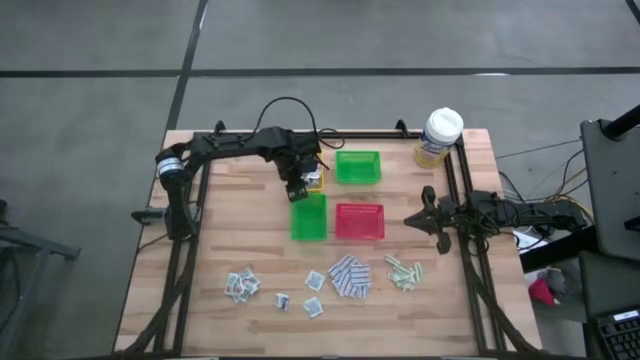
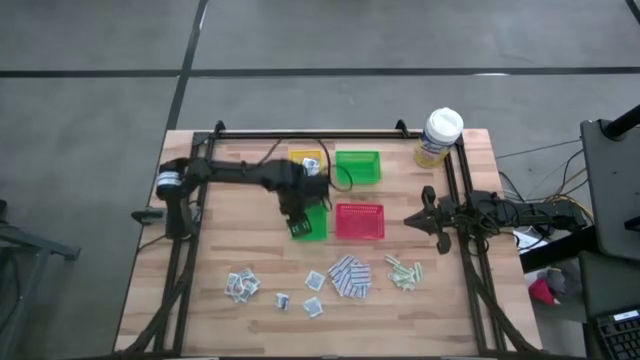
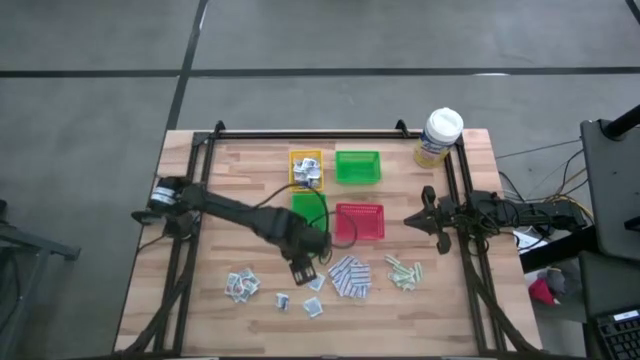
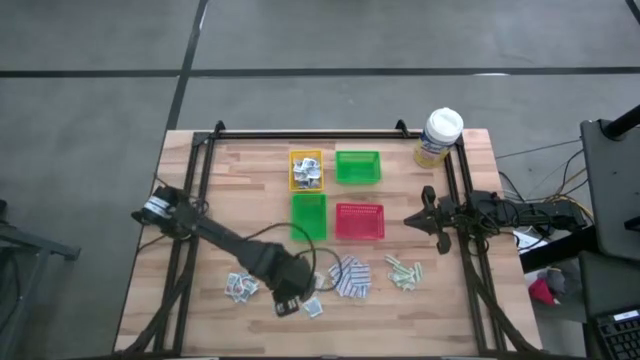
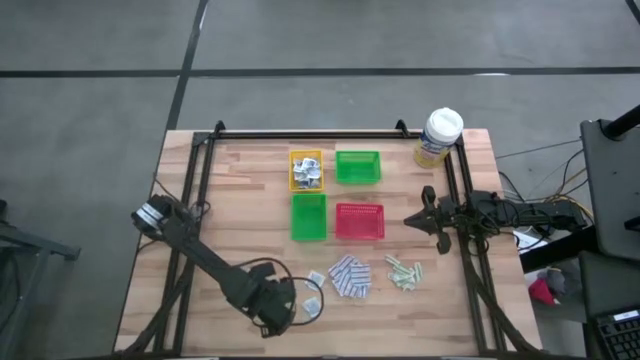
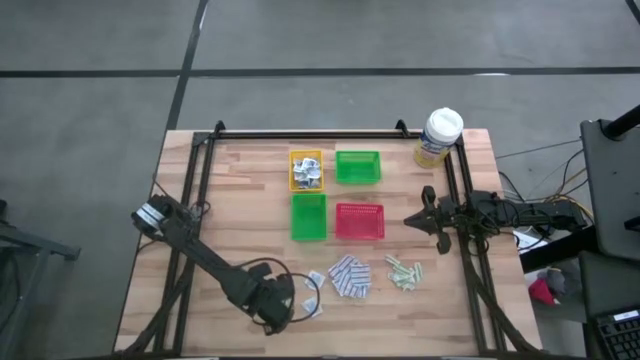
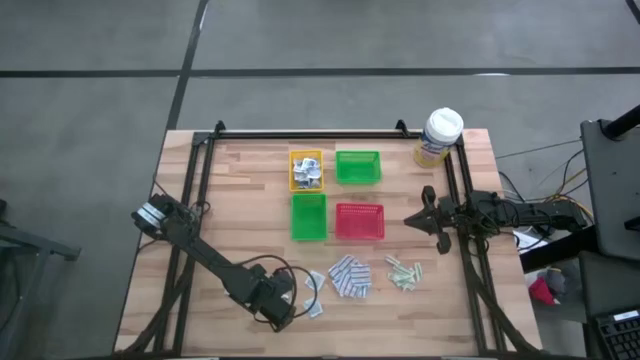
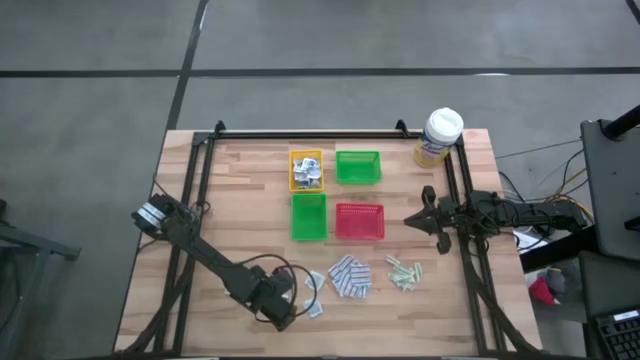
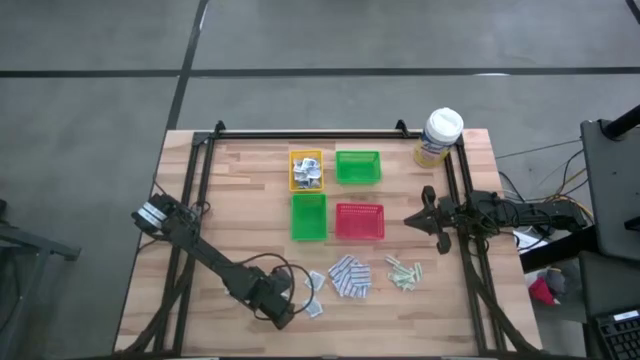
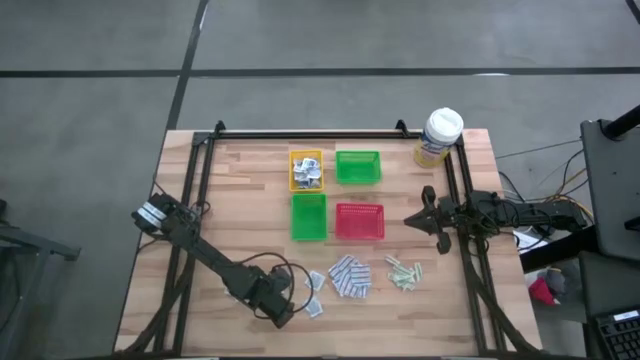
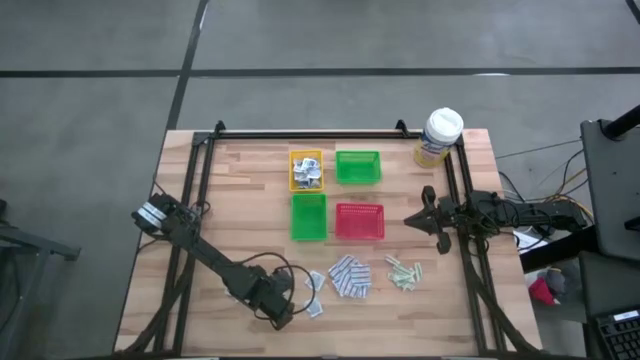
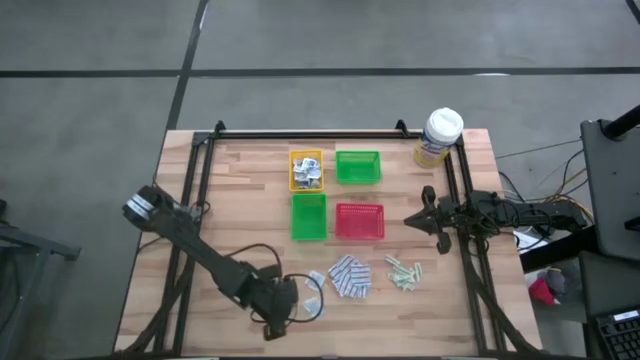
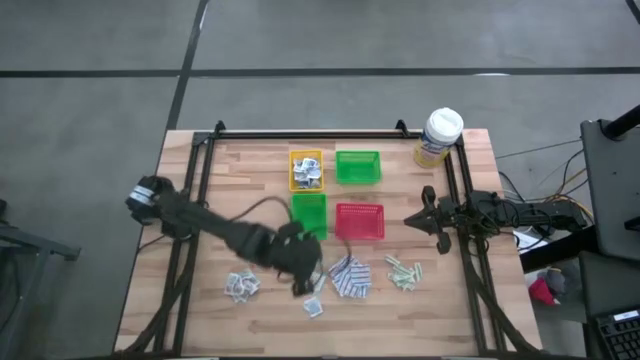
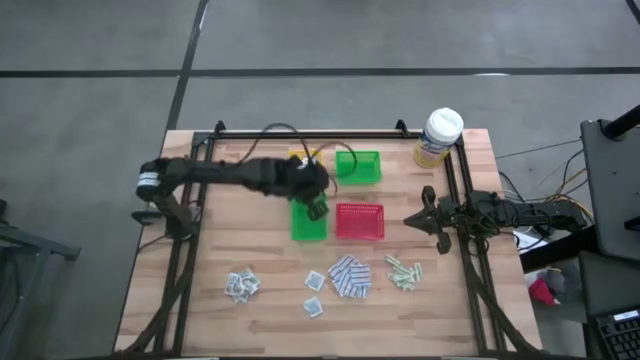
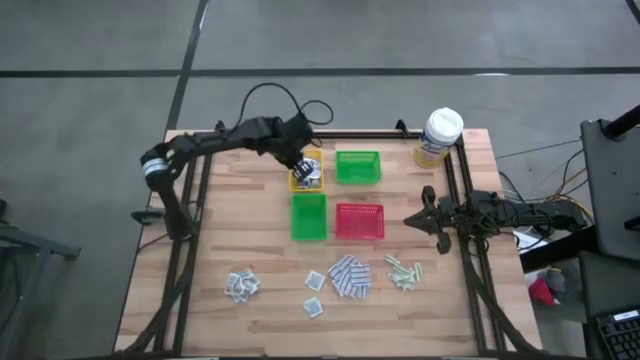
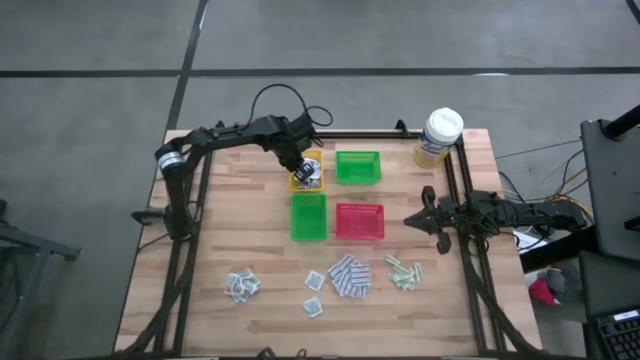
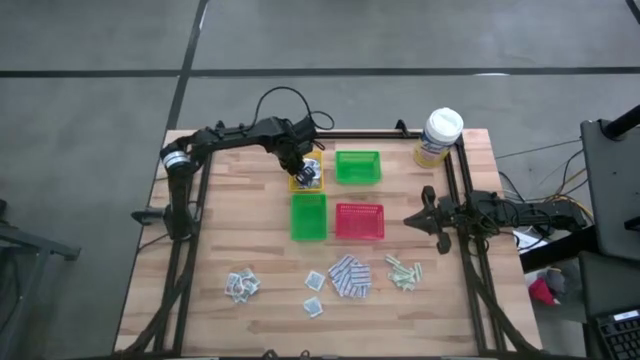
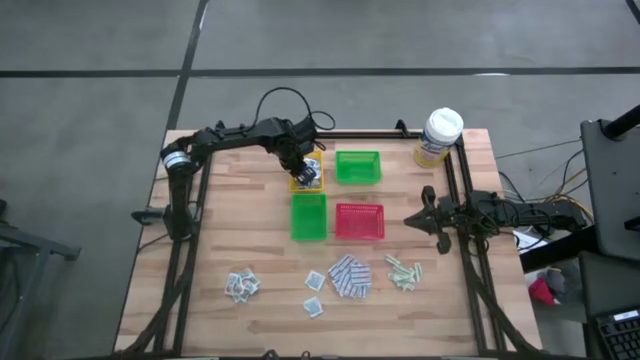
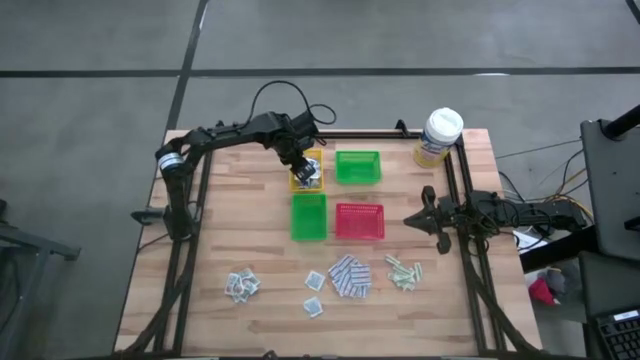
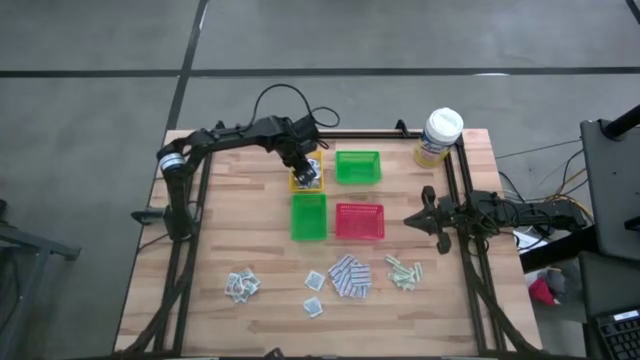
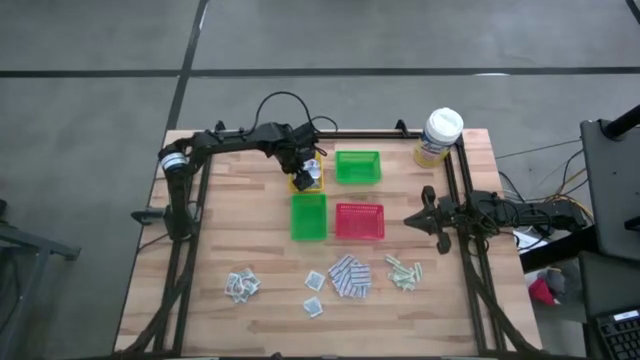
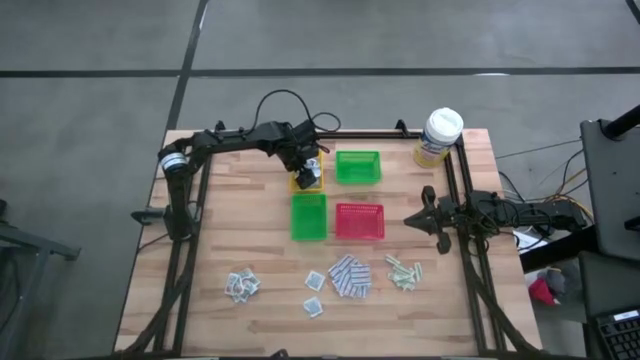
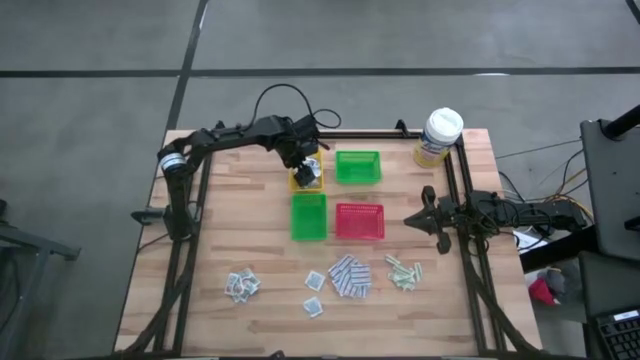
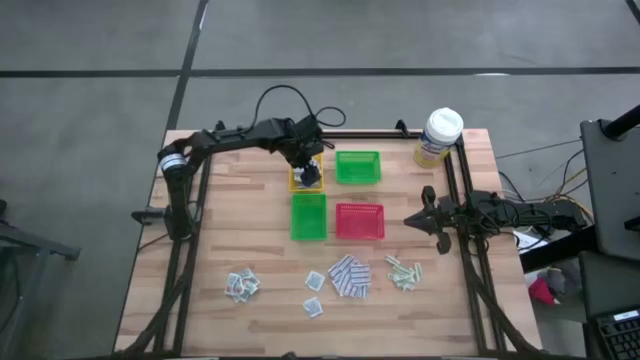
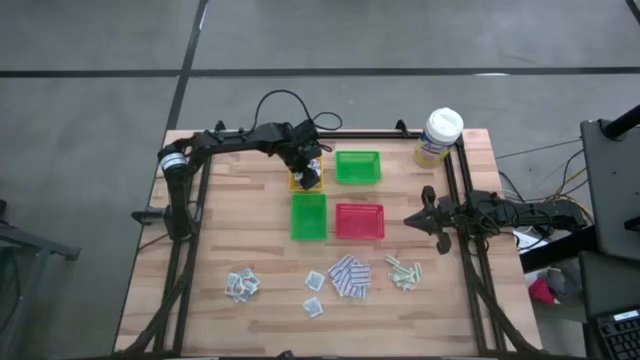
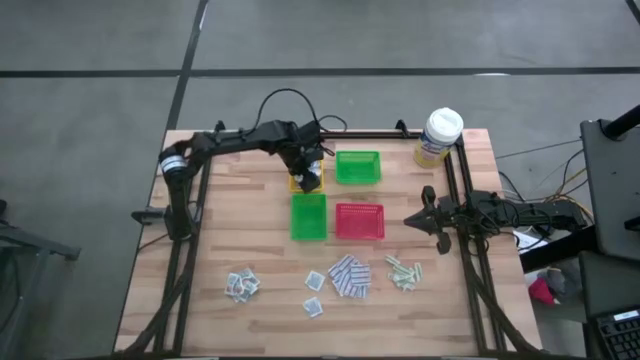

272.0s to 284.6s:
Task: Pick & Place First Aid Supplies
Put the blue alcohol pad into the yellow bin

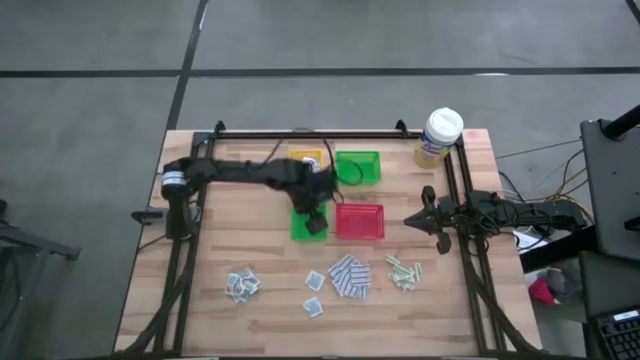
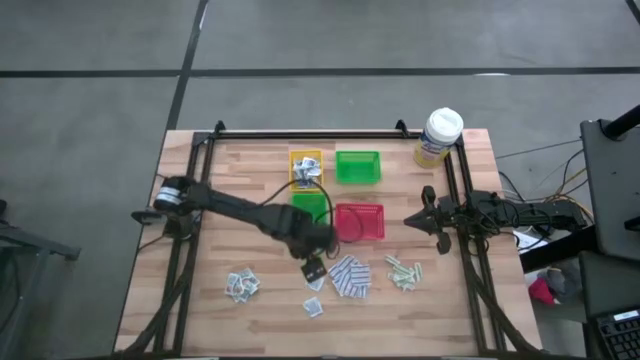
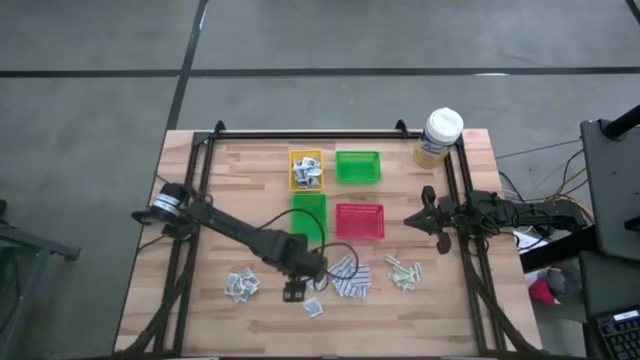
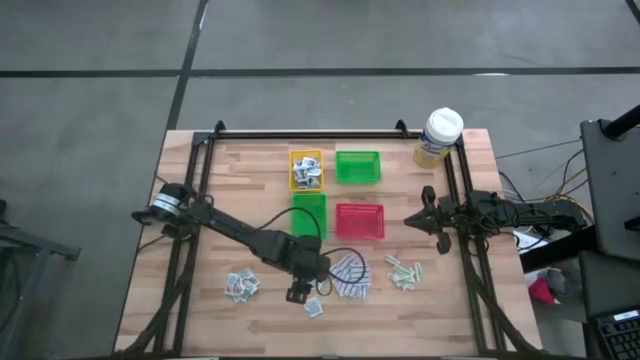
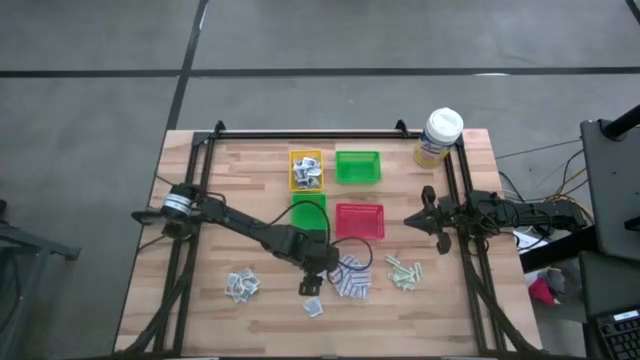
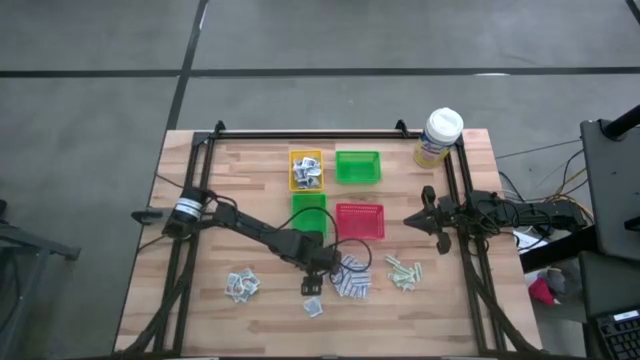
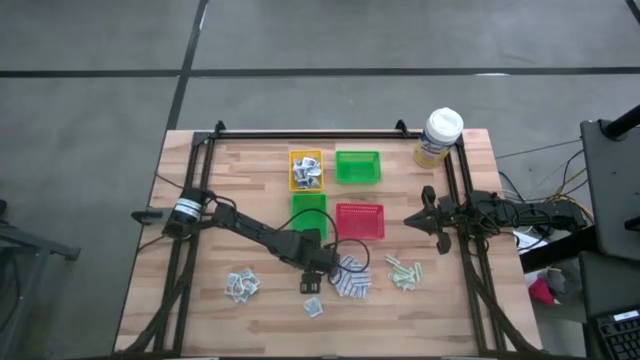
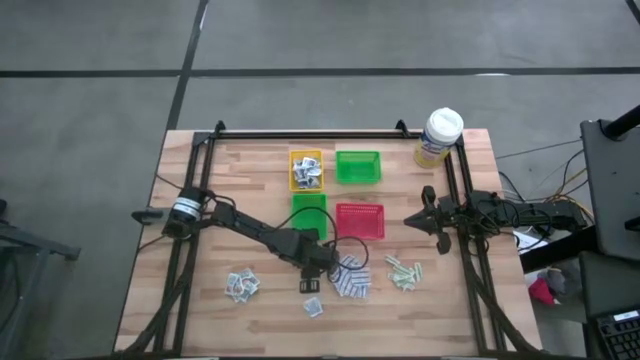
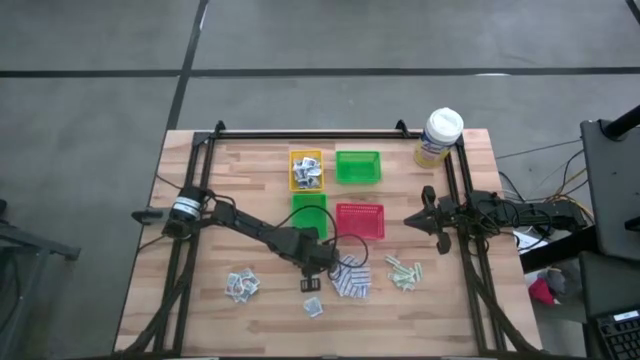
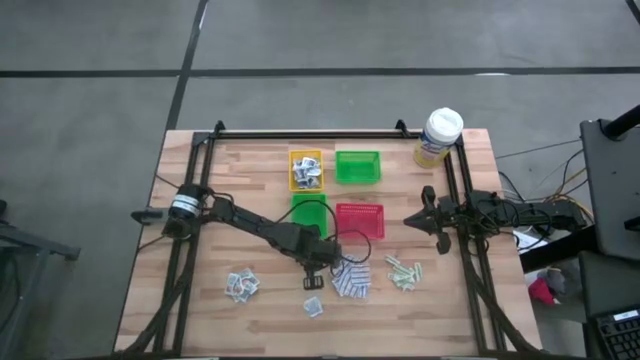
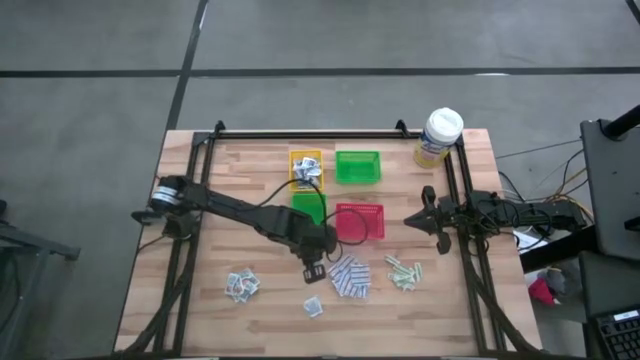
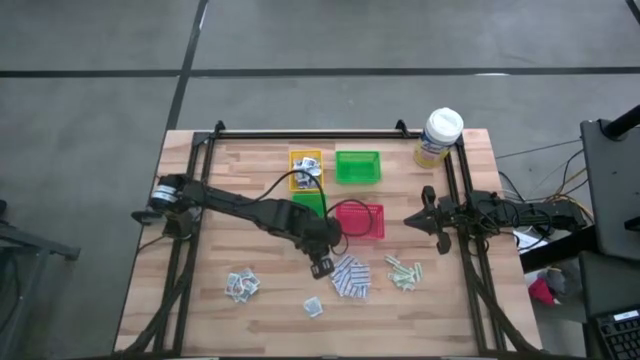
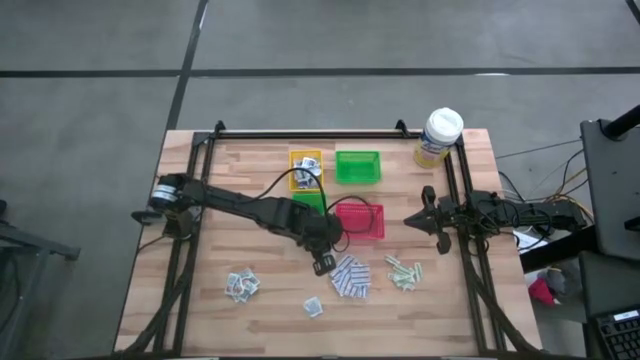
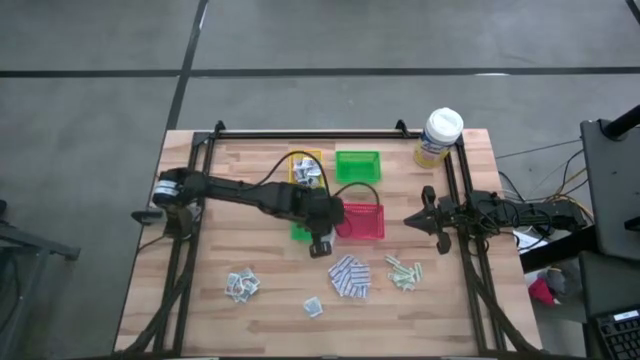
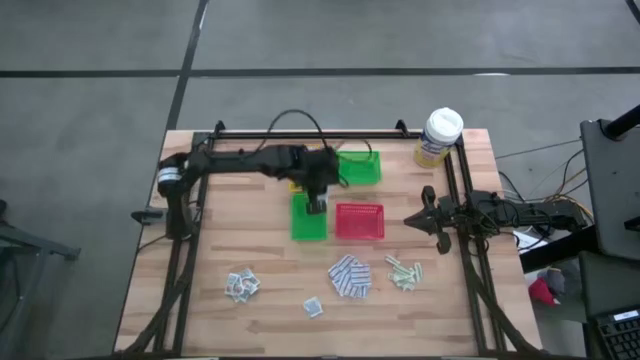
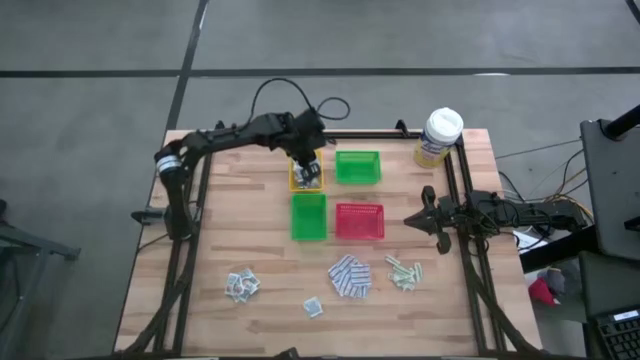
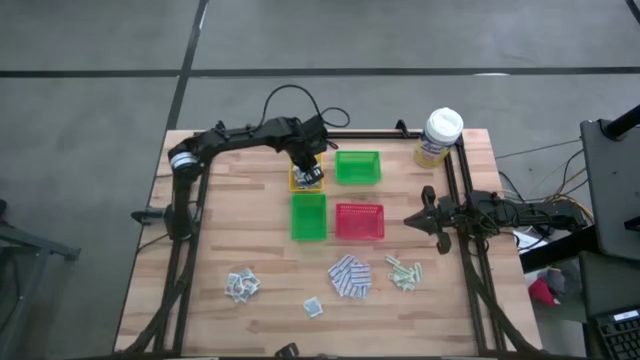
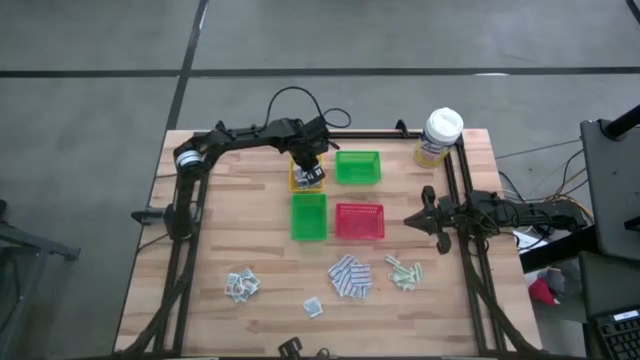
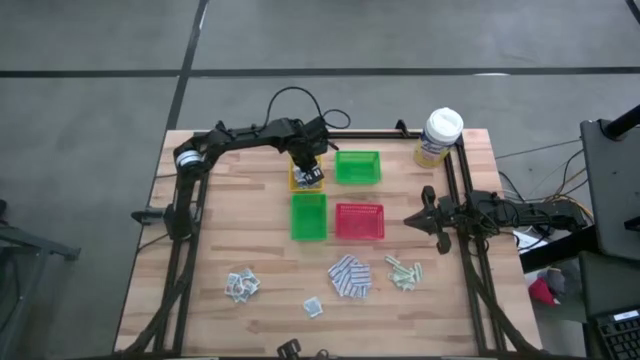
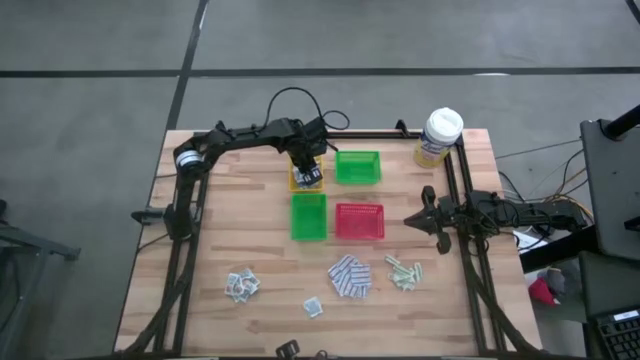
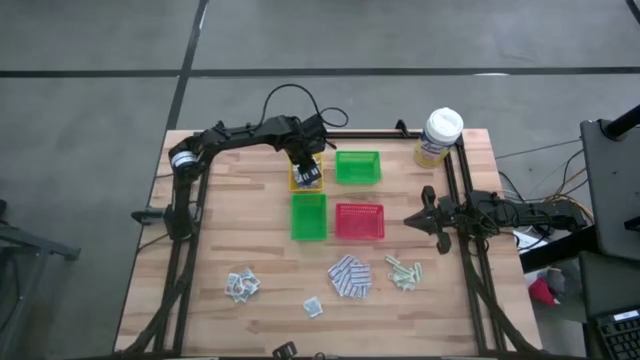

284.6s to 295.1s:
Put the blue alcohol pad into the yellow bin
